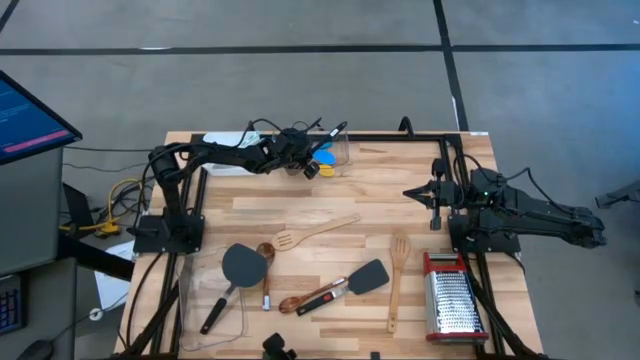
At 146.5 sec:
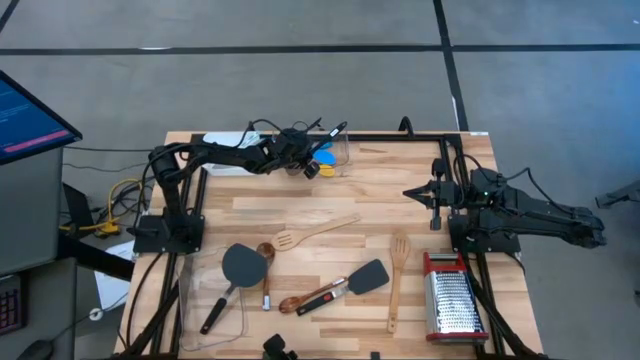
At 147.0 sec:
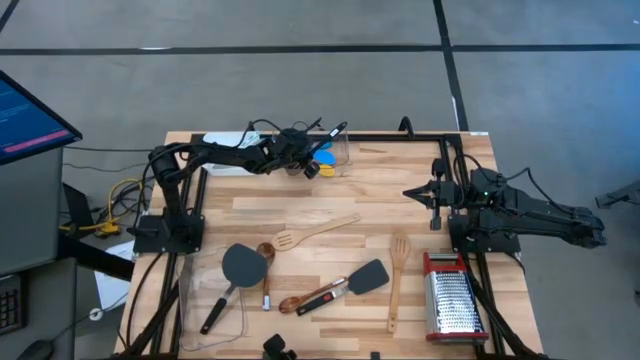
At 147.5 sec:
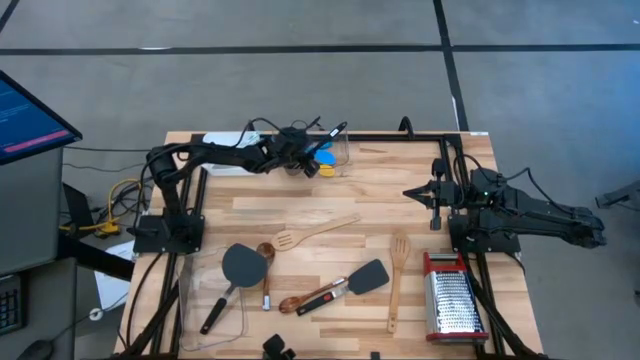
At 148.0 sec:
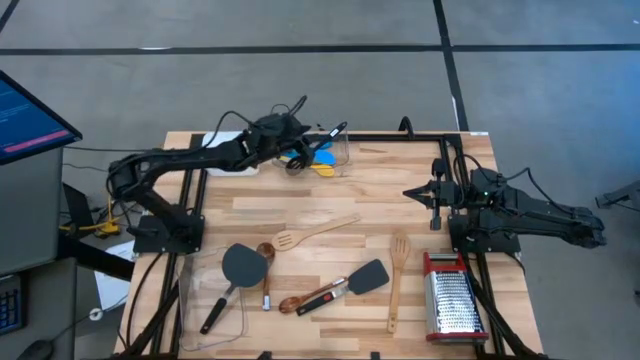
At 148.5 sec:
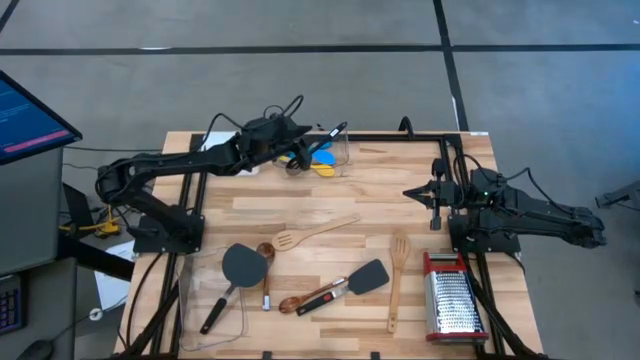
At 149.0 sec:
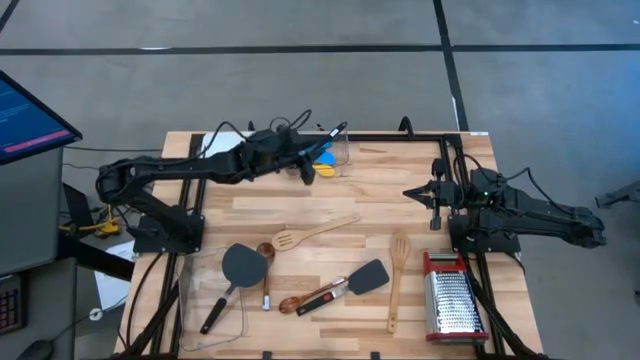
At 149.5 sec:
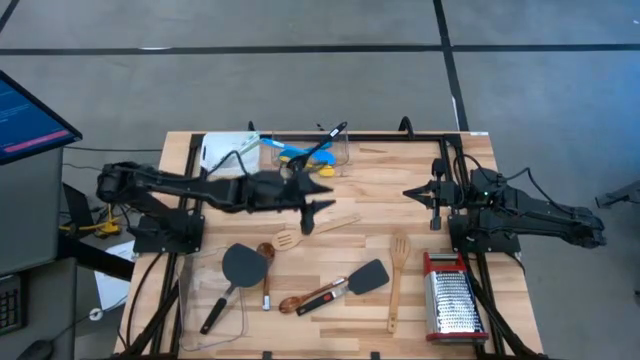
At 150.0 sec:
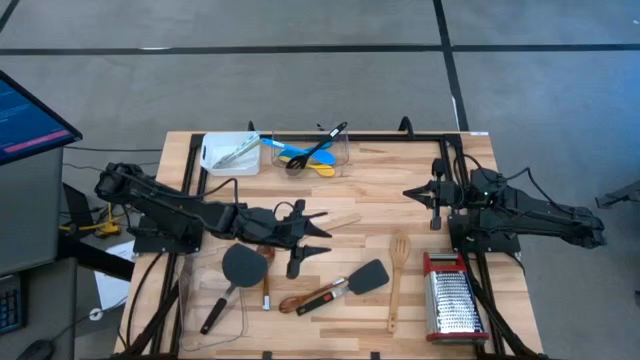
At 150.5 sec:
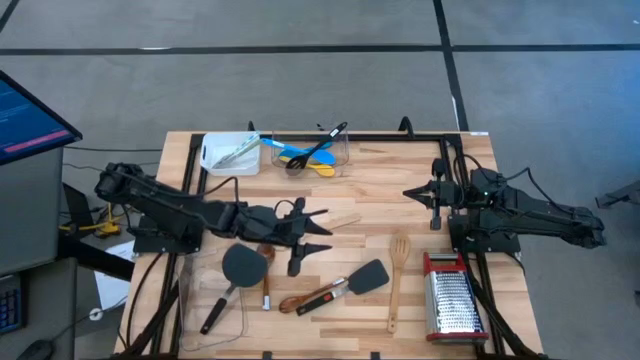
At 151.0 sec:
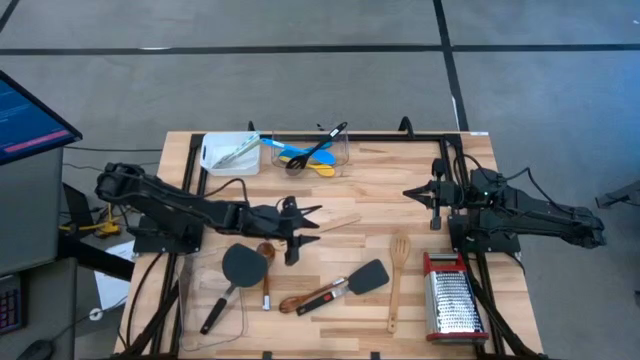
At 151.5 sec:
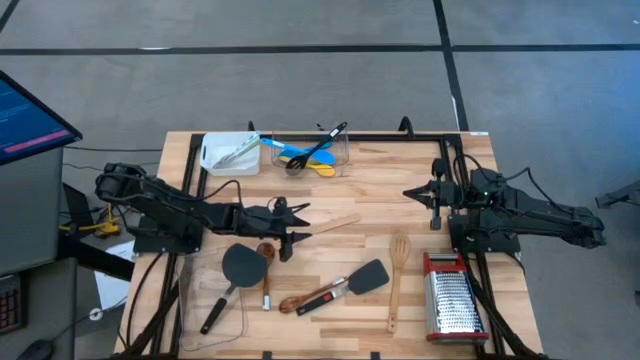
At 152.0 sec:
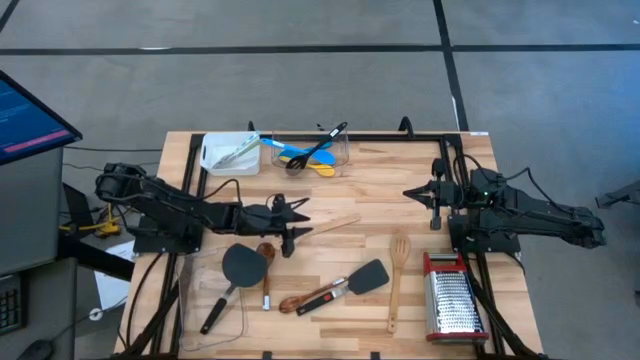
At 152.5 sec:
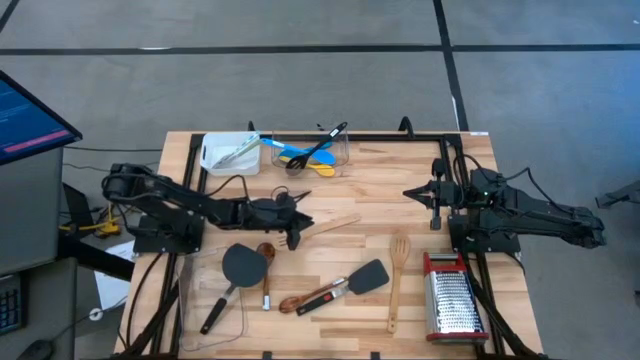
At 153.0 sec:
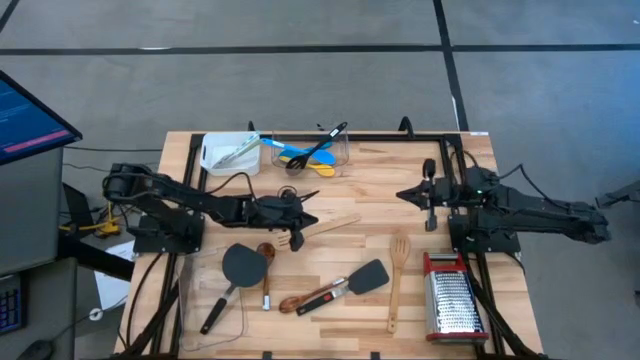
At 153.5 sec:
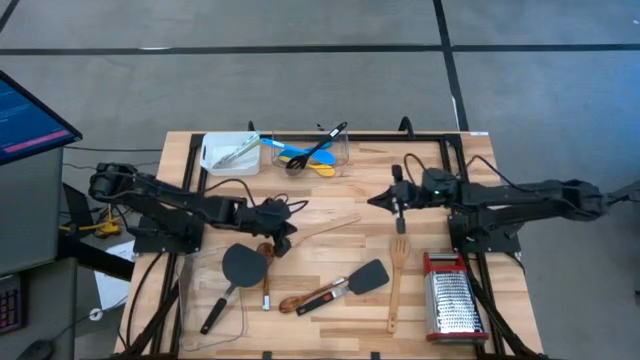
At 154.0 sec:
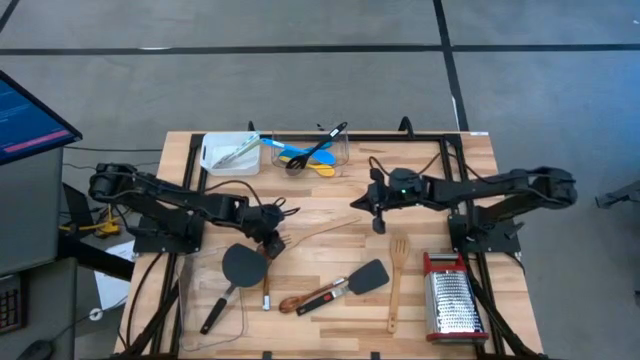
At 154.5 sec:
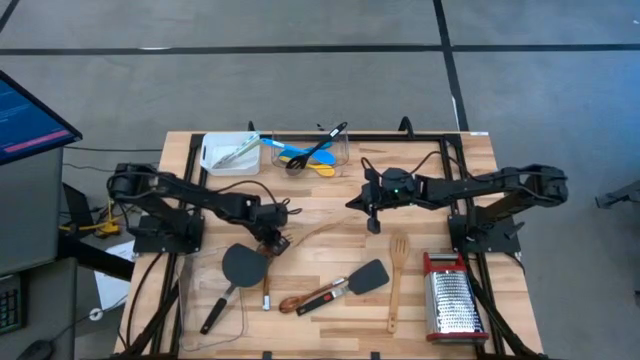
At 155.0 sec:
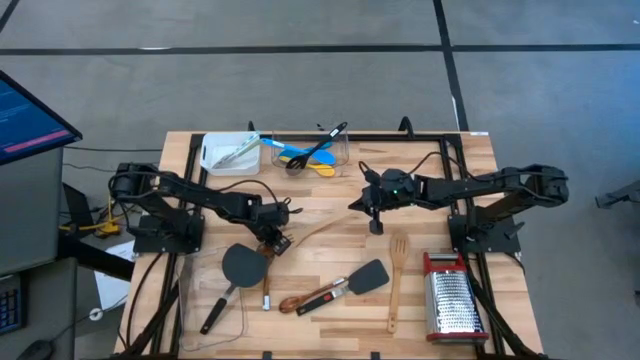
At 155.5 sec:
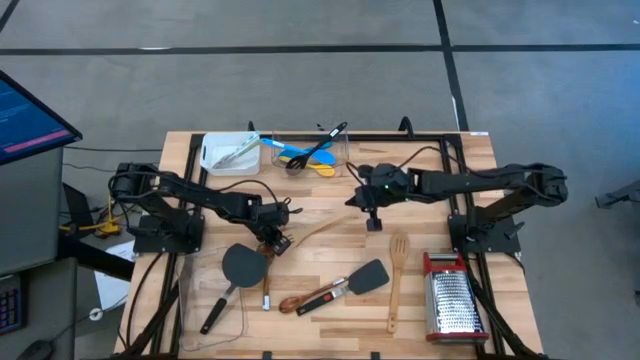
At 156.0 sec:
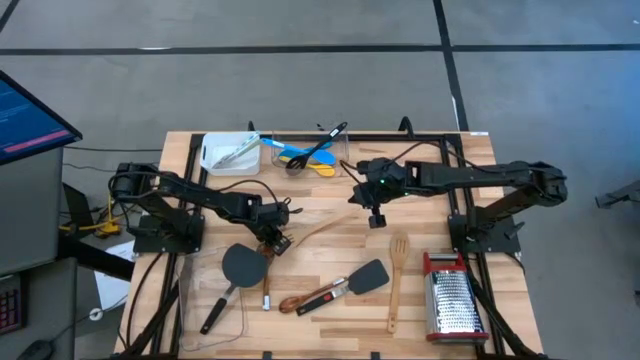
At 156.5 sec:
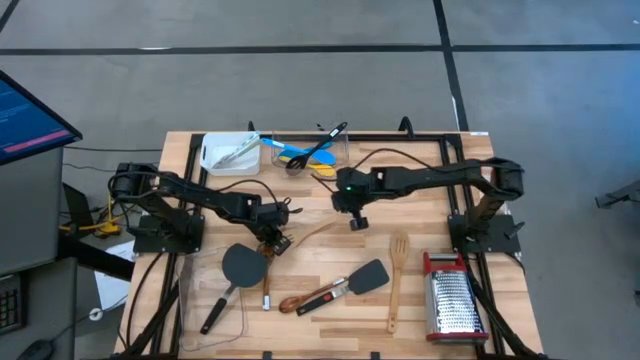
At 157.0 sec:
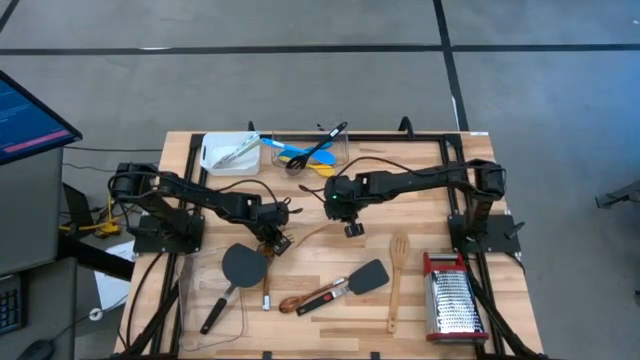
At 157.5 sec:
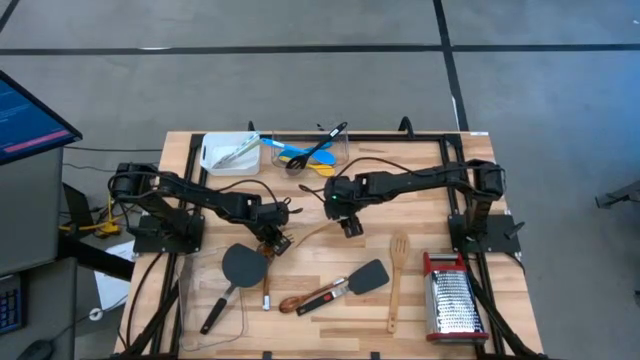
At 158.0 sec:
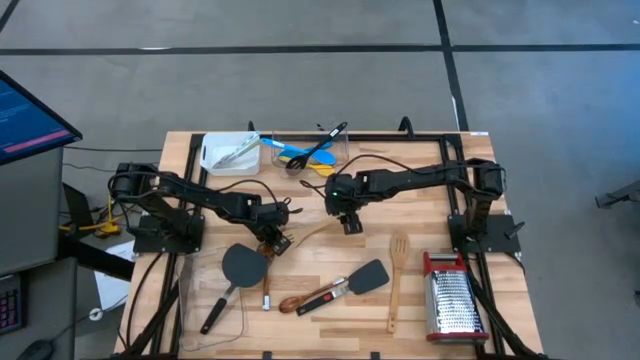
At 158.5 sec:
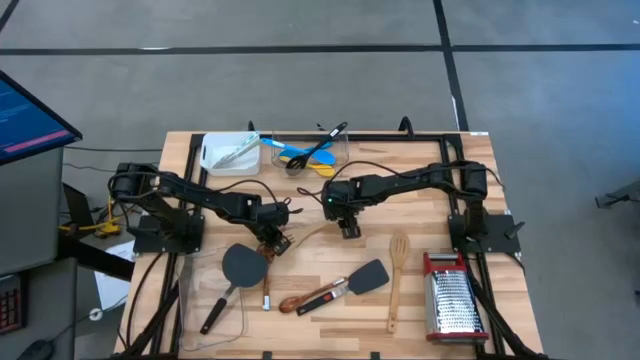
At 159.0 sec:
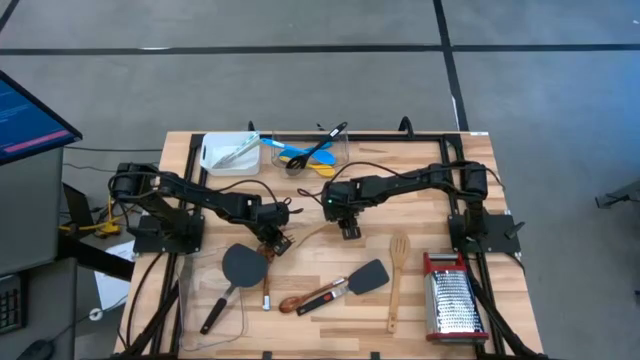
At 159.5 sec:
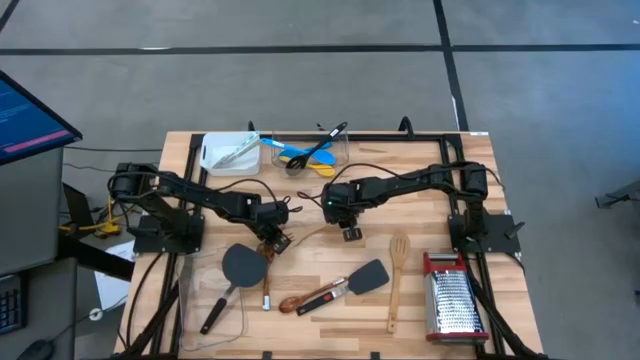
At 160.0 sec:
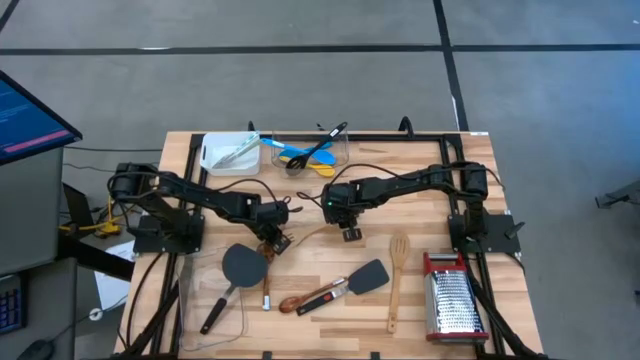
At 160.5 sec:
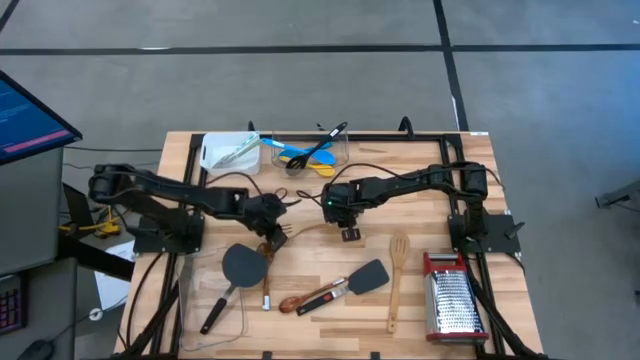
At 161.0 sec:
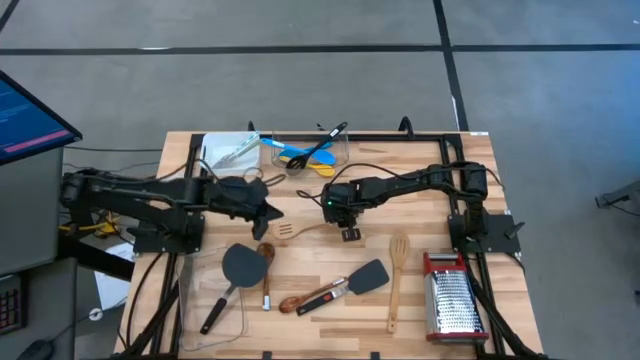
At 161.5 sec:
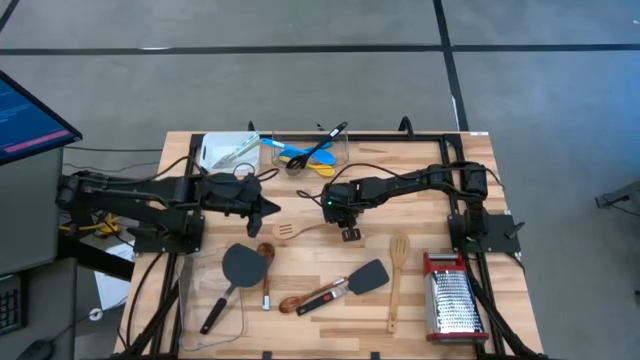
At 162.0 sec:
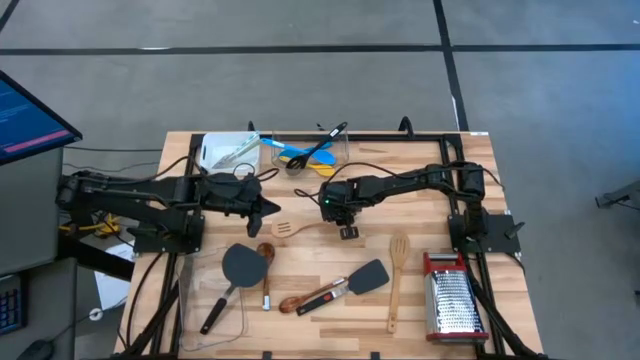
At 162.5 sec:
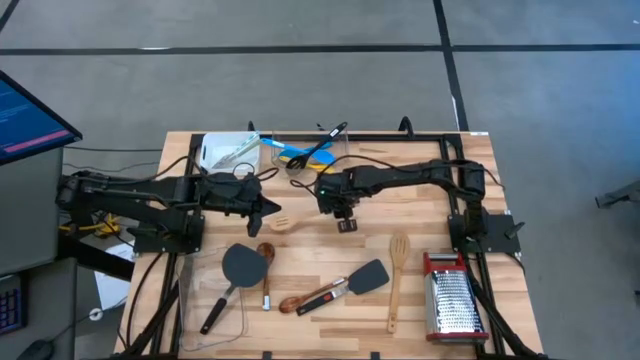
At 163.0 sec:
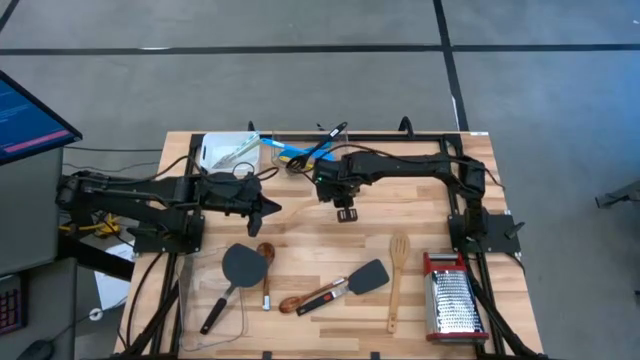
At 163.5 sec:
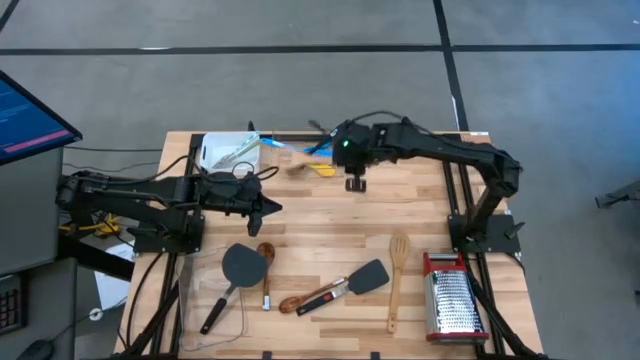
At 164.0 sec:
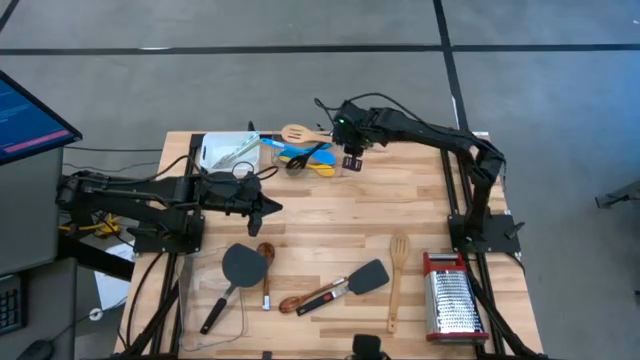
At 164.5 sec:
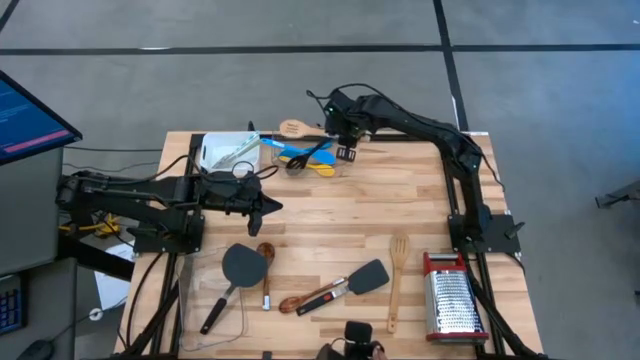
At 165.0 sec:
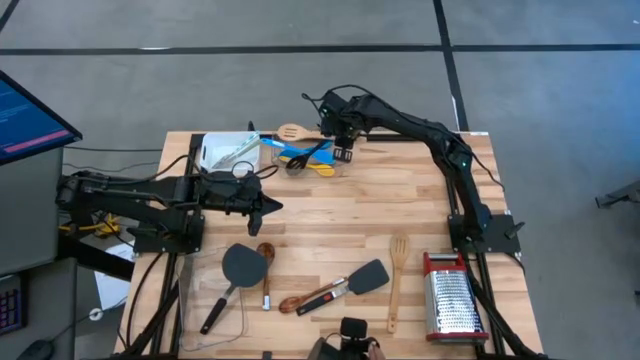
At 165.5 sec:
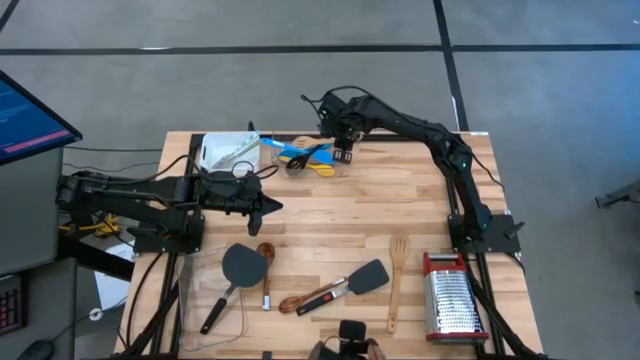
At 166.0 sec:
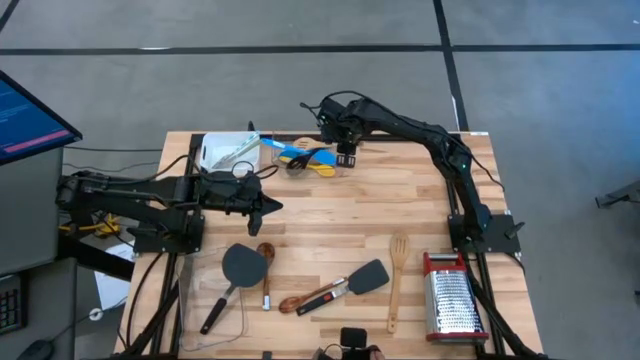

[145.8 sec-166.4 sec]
Task: Pick & Place Kitchen Items
Put the brown slotted spoon into the top transparent bin
